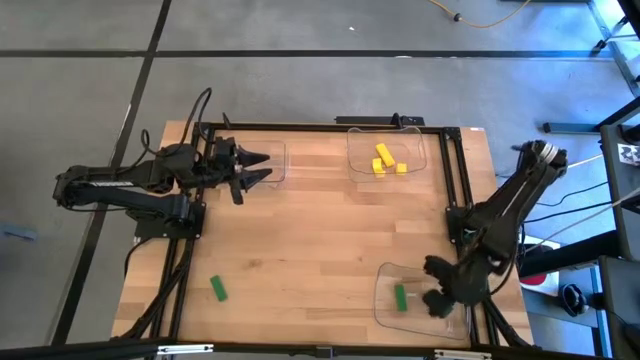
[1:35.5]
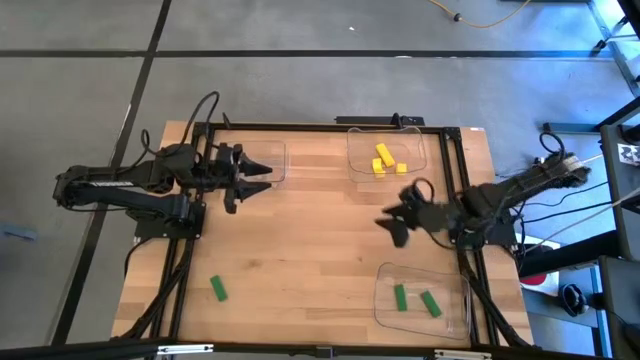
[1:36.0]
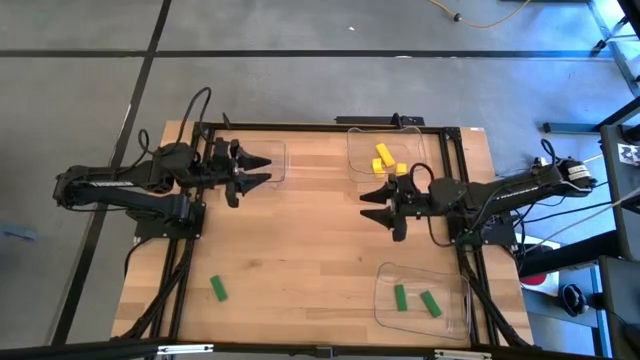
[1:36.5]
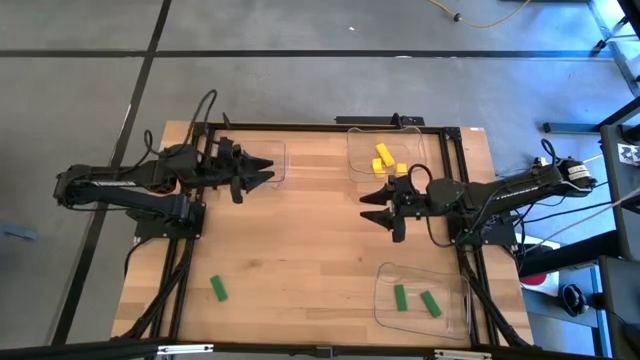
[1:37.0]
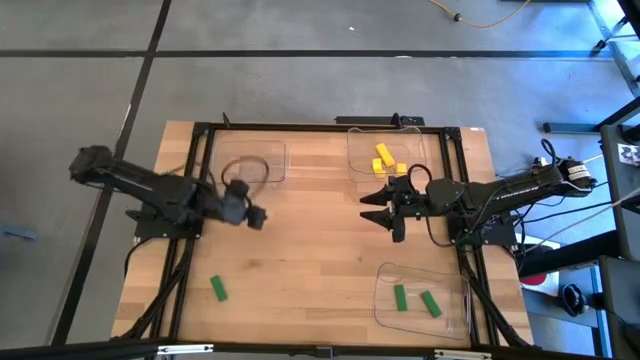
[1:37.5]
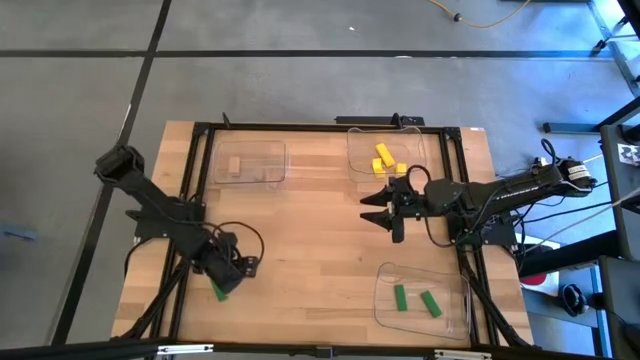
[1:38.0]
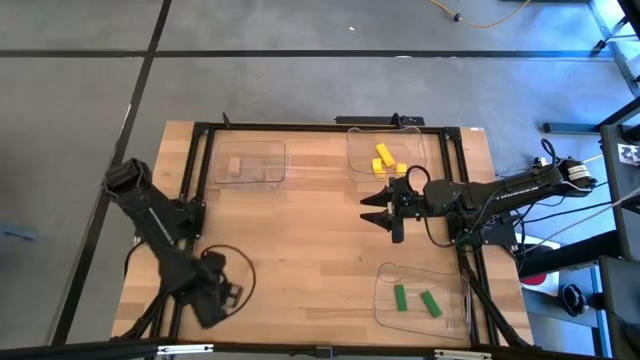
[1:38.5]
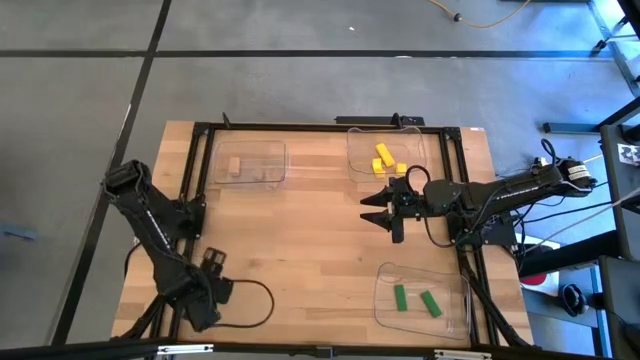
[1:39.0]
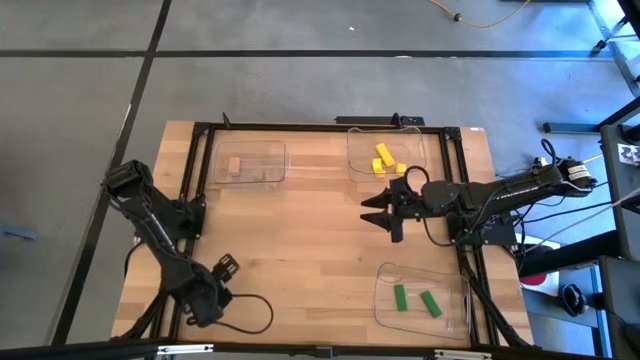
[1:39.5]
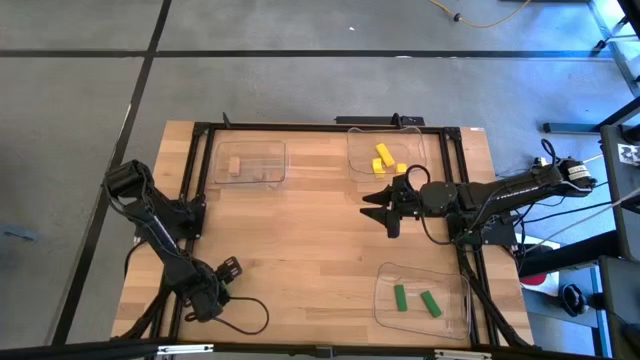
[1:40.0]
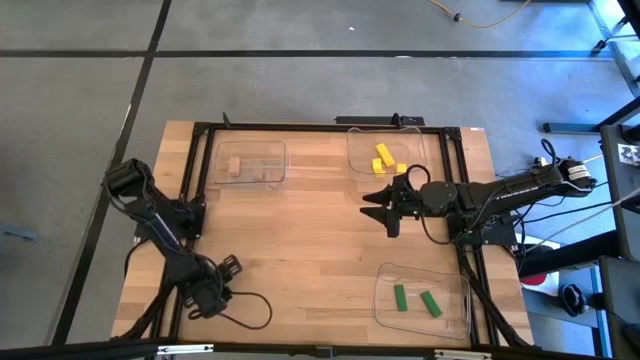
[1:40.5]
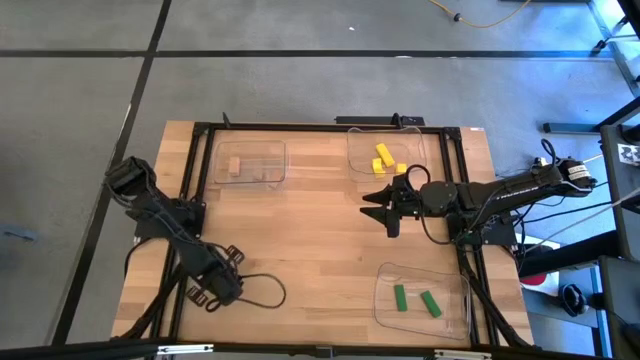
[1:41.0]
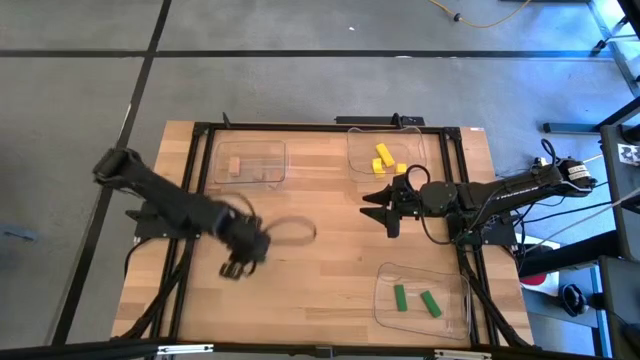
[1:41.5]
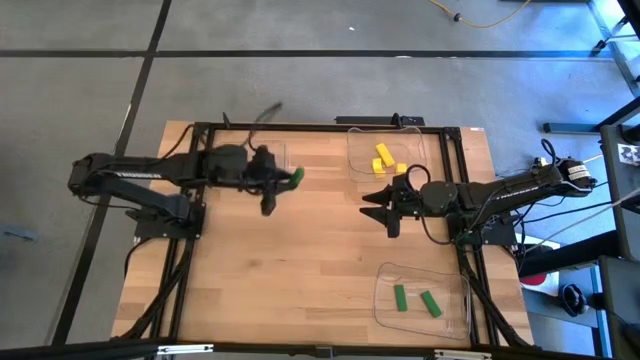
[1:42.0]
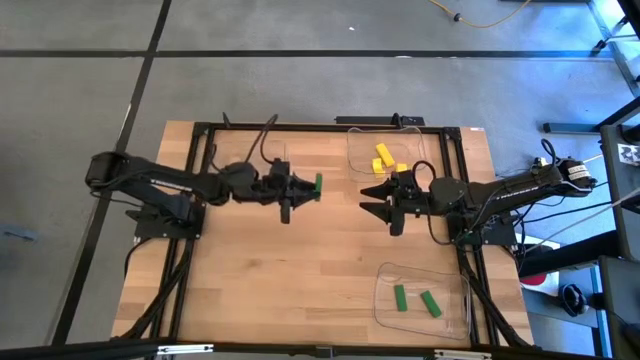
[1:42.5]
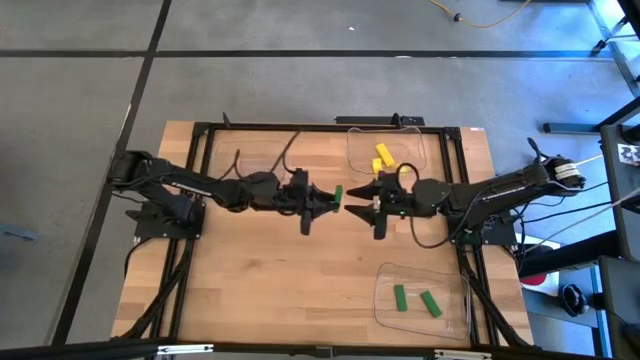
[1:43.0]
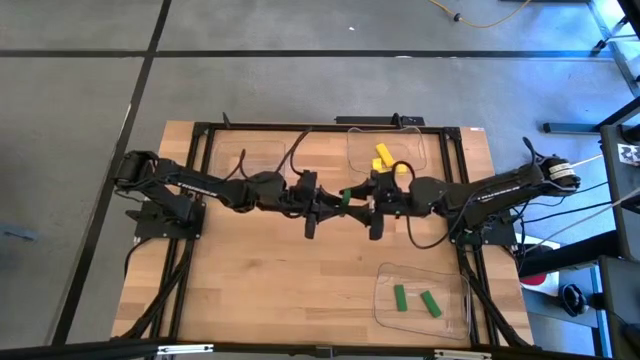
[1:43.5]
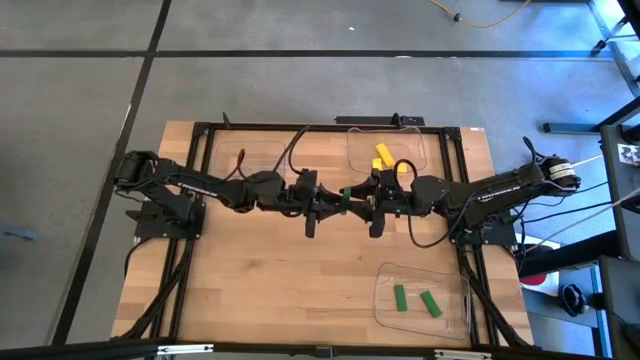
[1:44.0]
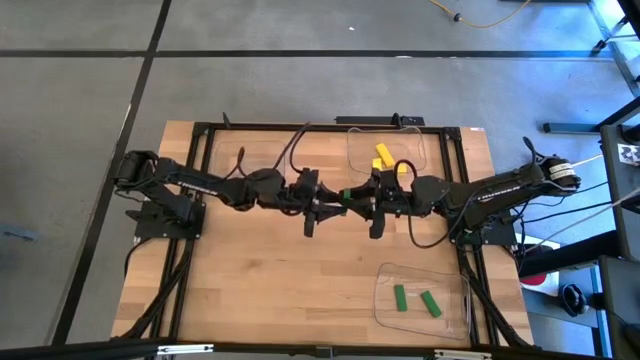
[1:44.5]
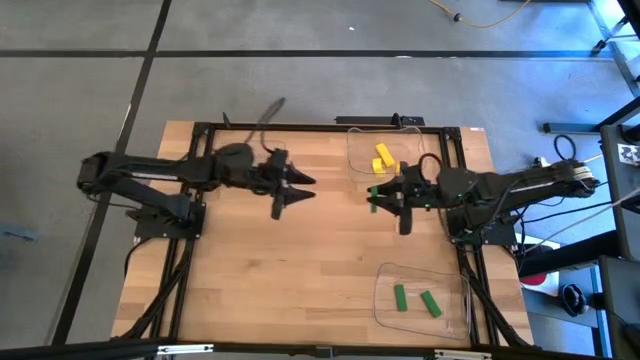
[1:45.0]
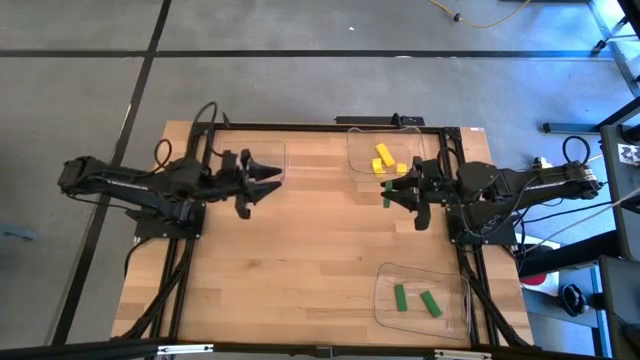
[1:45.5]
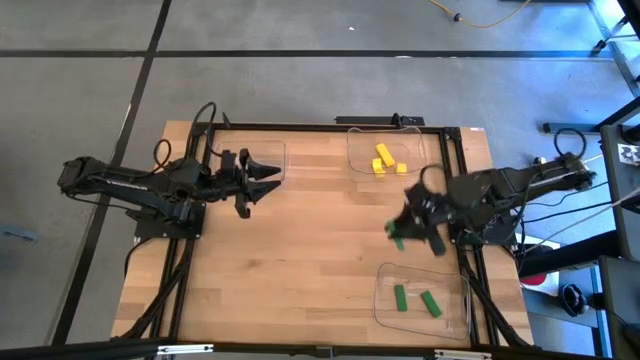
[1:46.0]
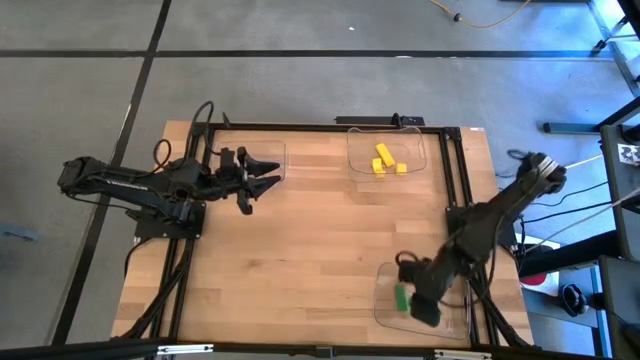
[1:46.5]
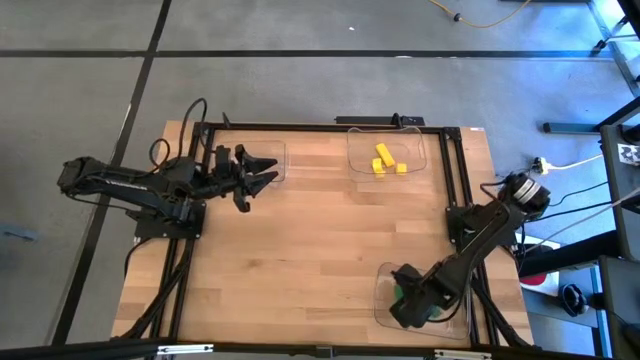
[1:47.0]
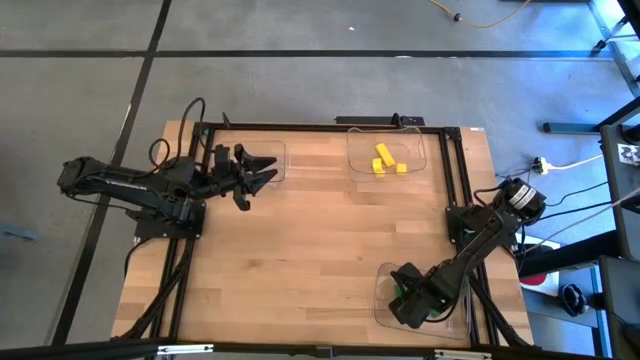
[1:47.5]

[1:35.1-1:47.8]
Task: Sort & place blocks by color
Put the green block into the bottom transparent bin

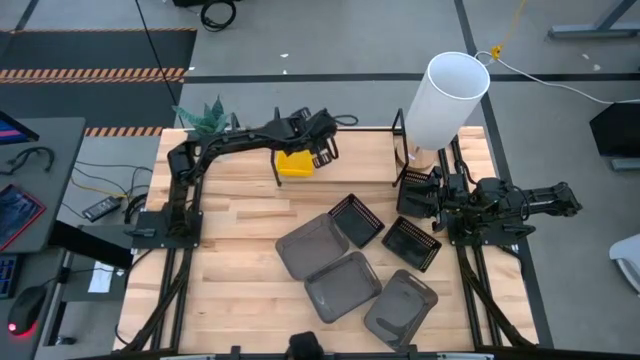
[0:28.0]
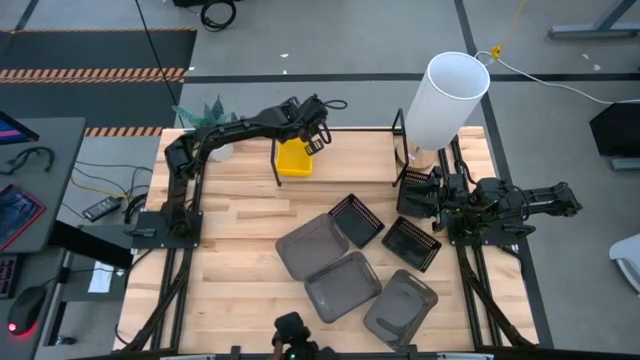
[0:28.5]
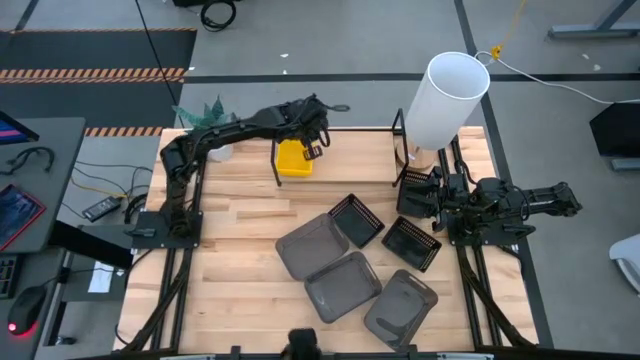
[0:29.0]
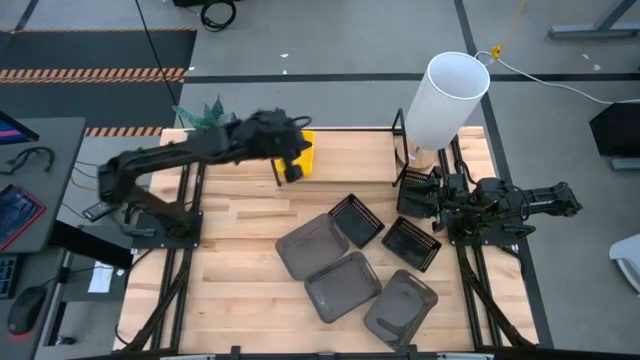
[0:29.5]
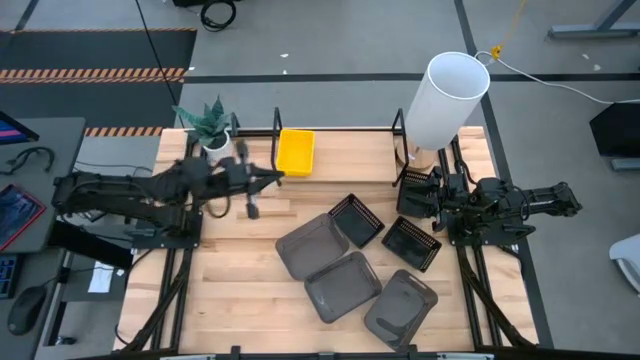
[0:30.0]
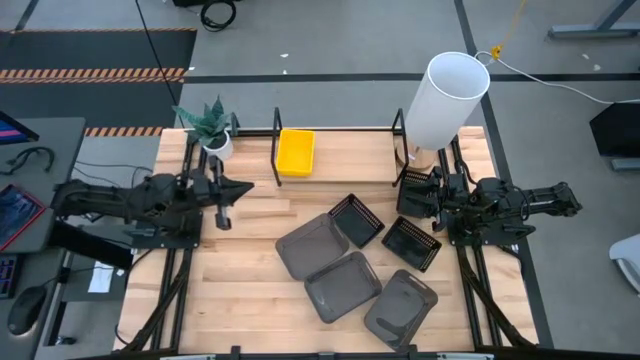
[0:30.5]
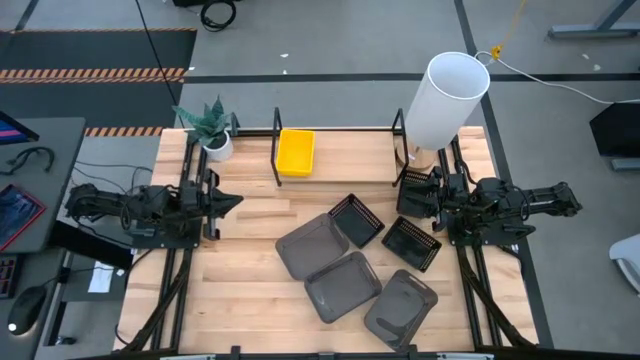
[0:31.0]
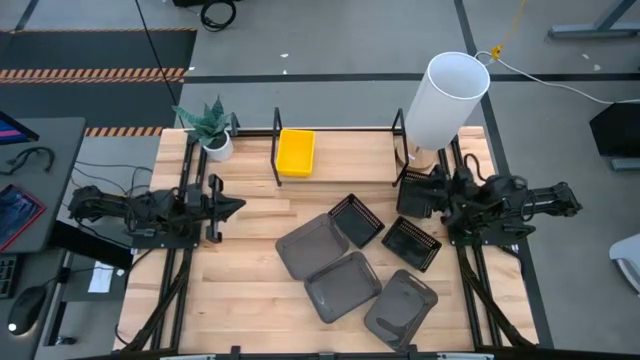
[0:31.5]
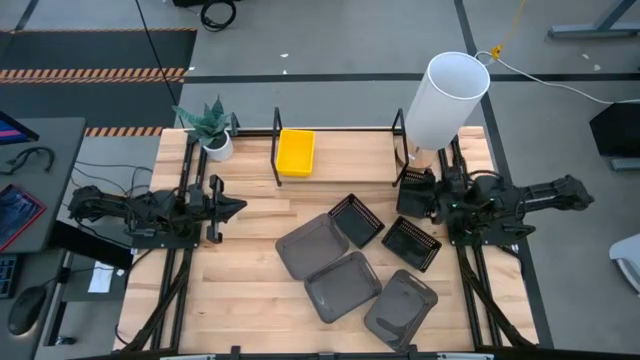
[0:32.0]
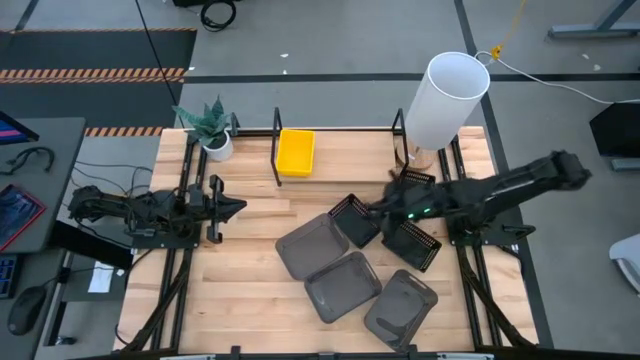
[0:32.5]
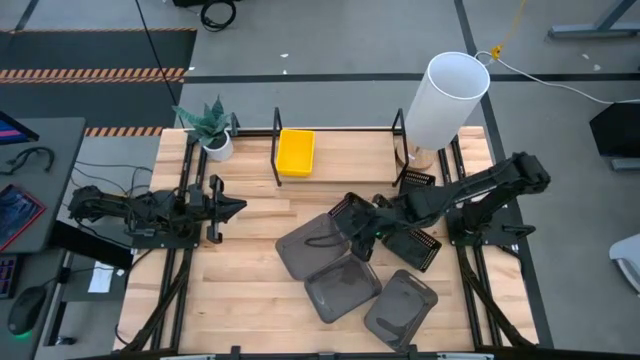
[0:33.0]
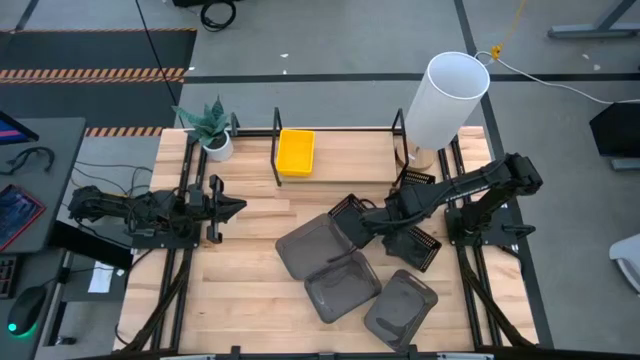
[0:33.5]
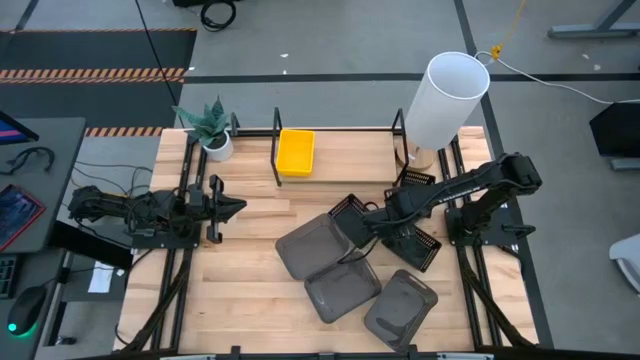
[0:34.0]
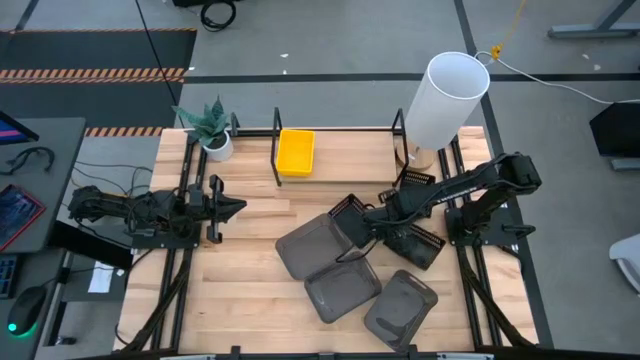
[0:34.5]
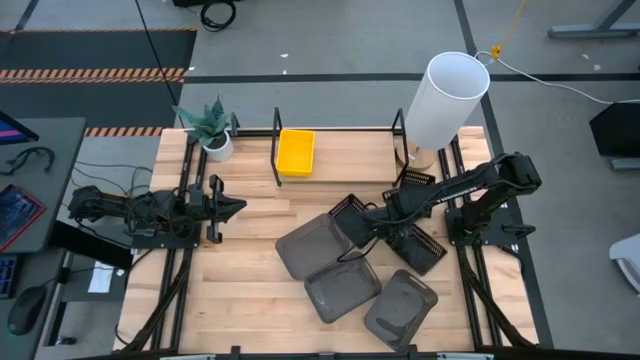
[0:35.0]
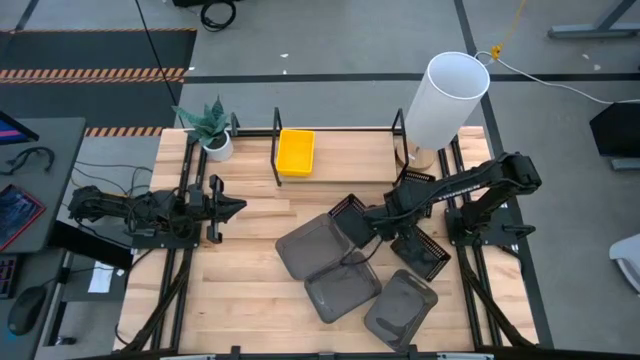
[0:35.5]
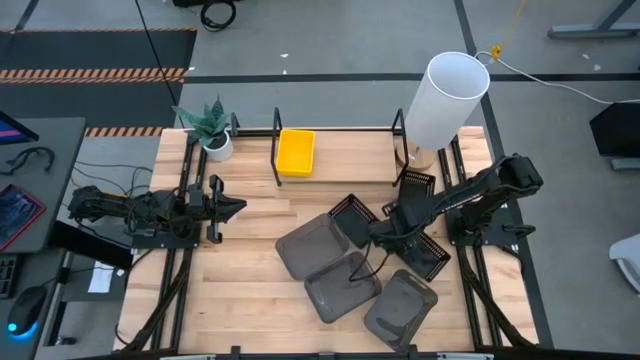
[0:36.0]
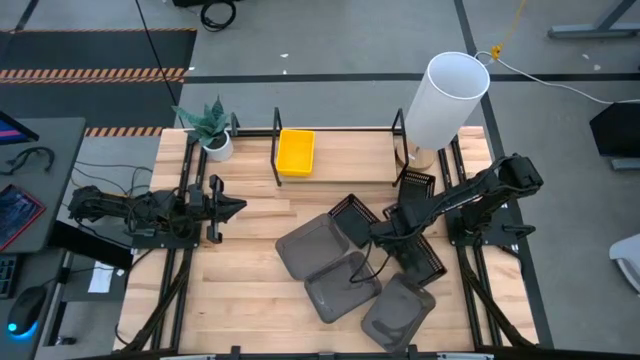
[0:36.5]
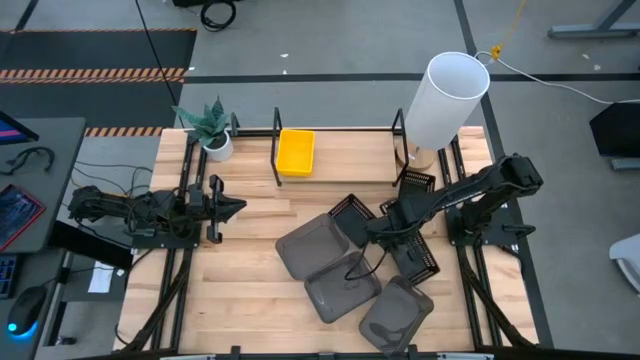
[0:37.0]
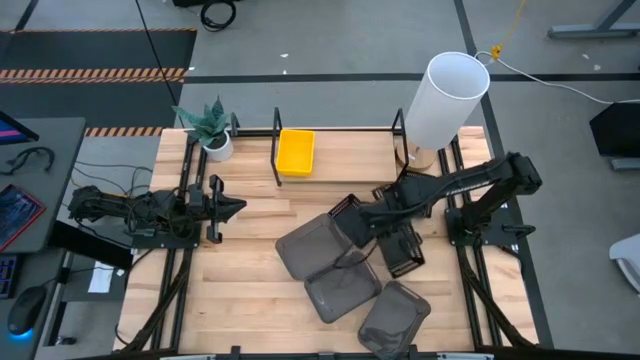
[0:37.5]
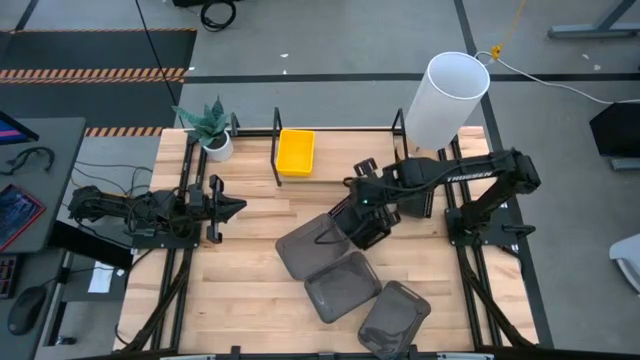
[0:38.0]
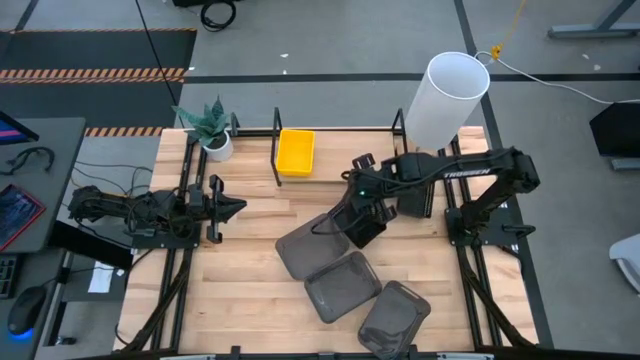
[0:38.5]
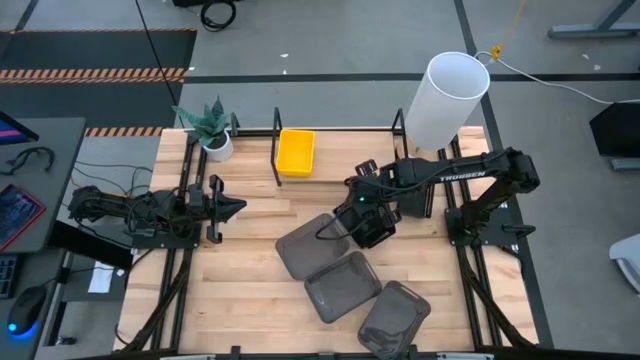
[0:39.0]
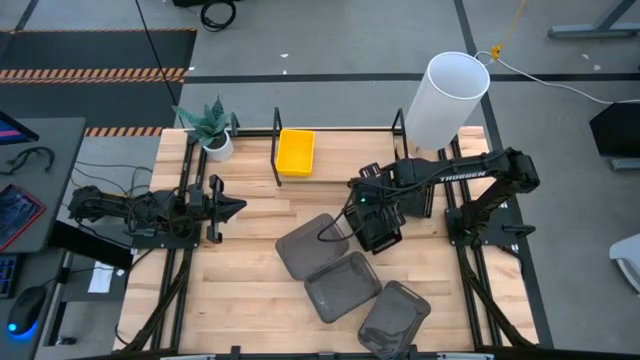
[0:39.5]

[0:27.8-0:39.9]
Task: Stack baskets on shelf by color
Stack the bottom right black bin on the left black bin
